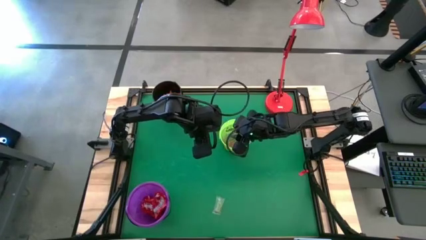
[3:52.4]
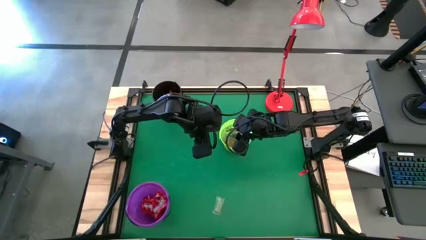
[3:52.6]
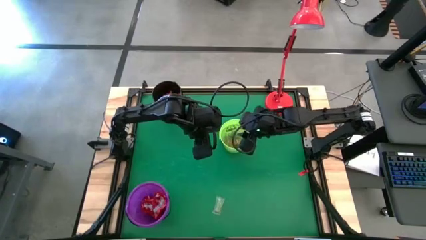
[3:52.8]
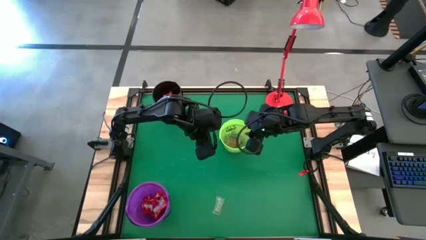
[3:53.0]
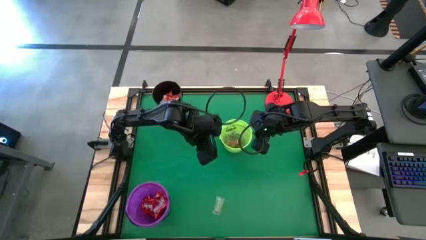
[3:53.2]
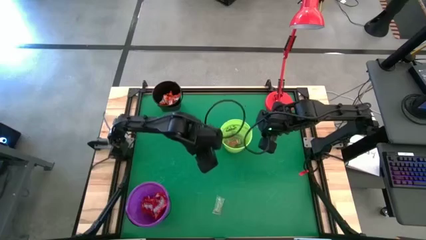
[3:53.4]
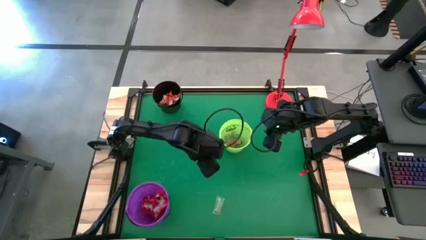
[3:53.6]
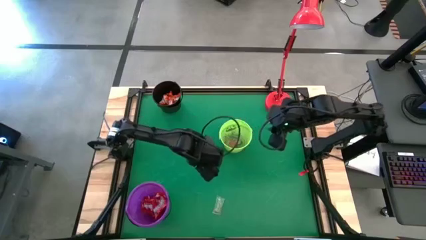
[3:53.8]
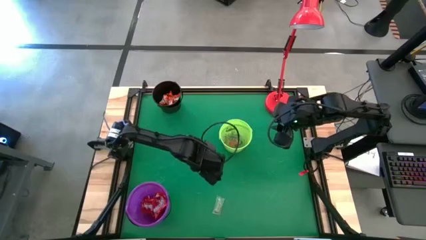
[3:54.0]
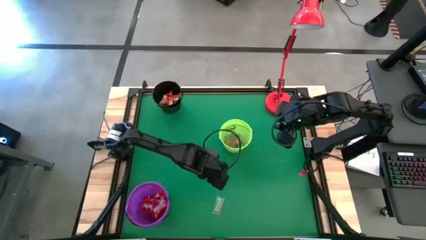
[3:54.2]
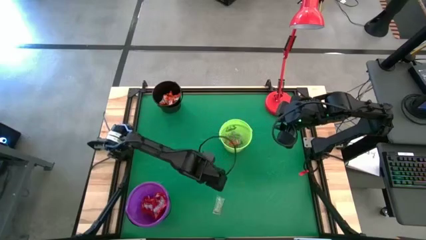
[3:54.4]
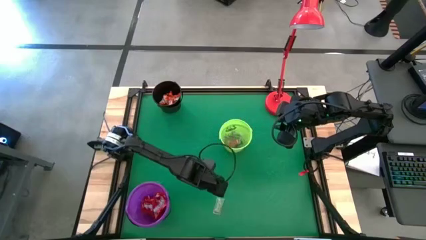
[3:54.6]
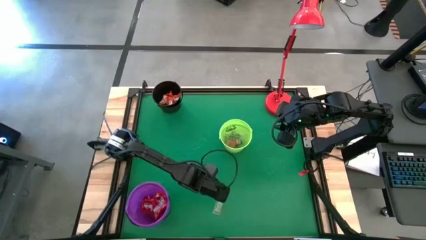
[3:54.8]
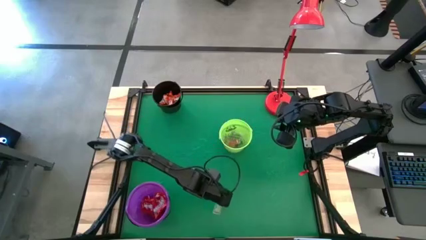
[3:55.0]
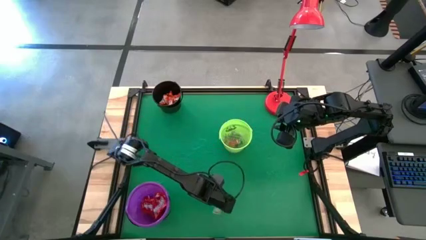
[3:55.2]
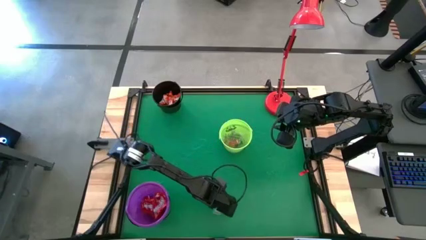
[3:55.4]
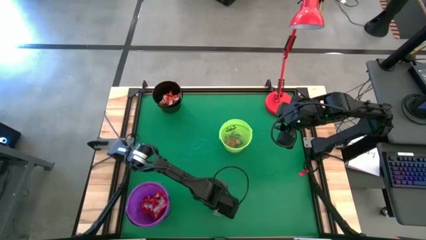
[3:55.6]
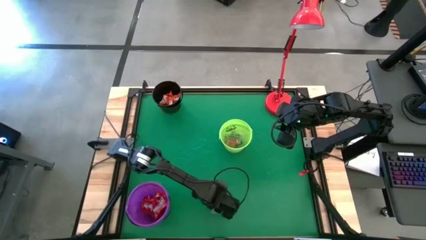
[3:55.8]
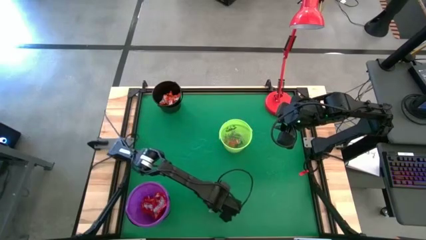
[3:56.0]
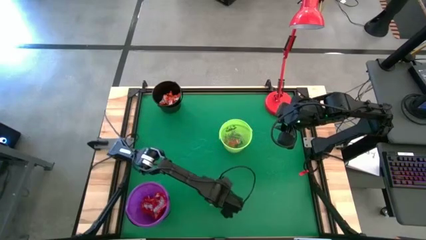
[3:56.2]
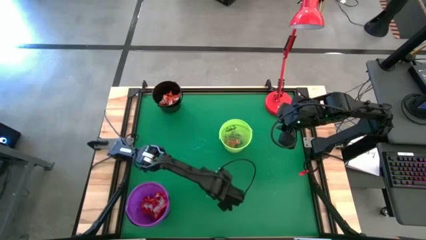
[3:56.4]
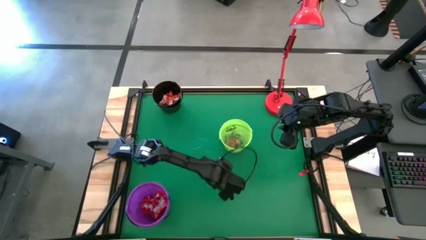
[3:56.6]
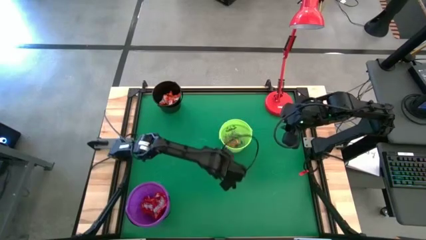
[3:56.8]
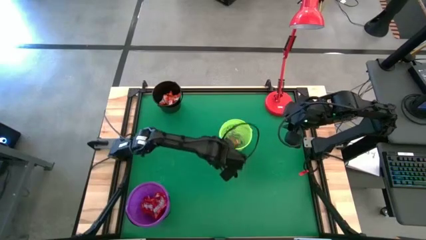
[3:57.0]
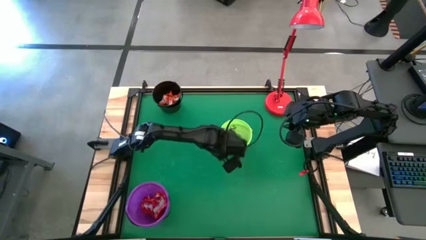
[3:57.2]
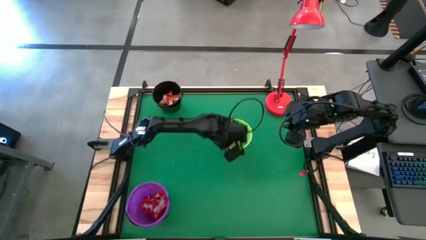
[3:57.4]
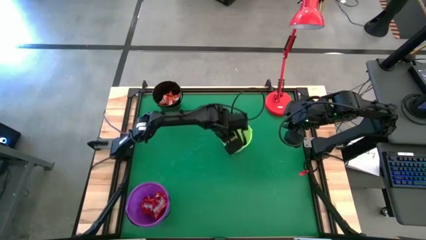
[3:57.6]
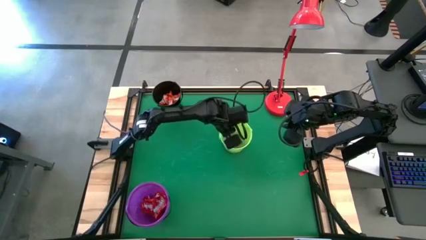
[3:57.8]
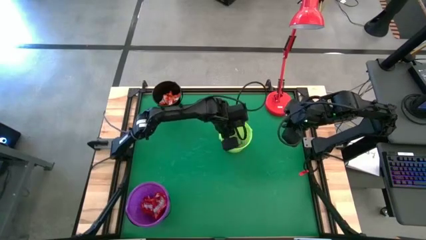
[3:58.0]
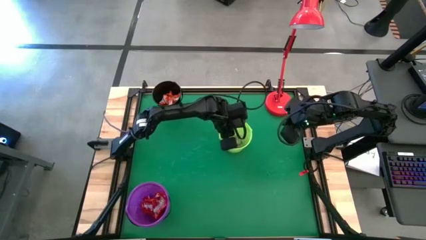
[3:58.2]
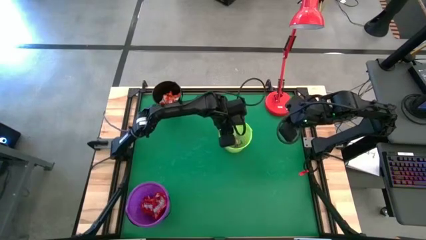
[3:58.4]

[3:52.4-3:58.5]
Task: Sort candy
Put the green gummy into the green bucket

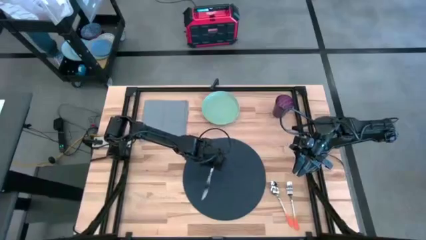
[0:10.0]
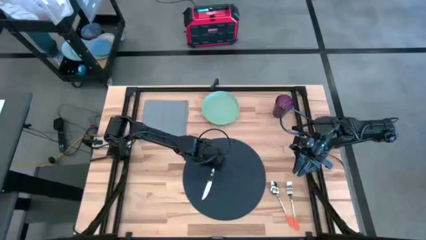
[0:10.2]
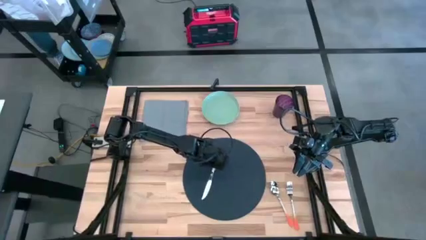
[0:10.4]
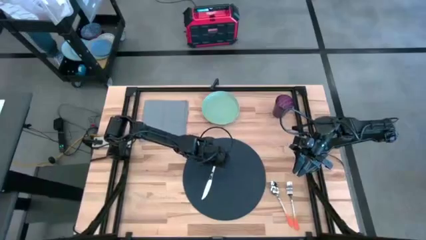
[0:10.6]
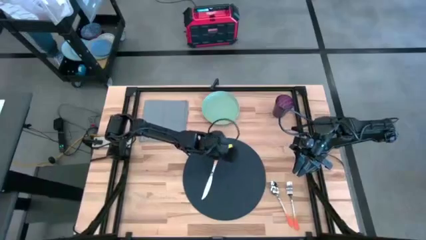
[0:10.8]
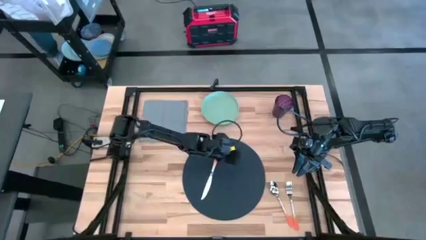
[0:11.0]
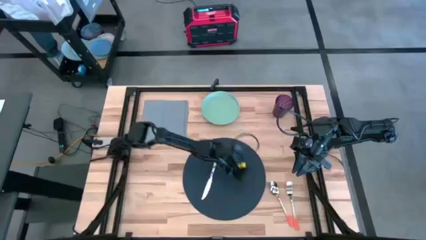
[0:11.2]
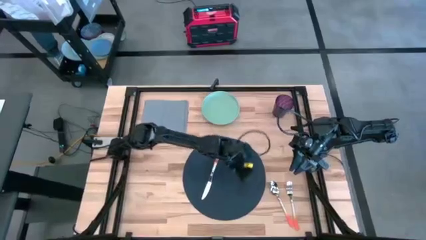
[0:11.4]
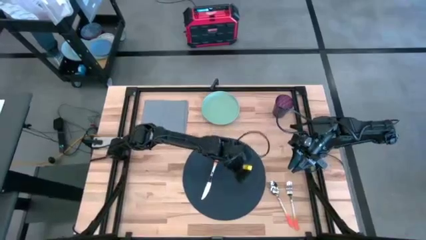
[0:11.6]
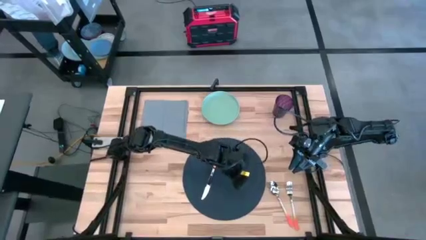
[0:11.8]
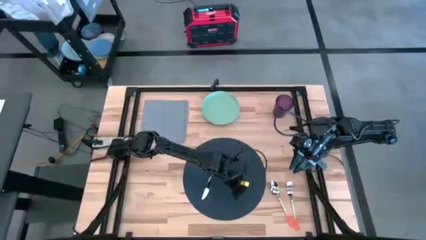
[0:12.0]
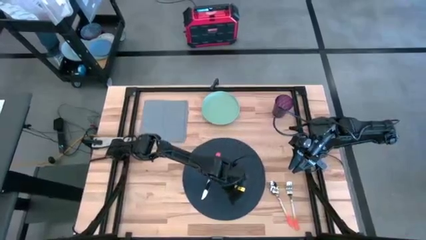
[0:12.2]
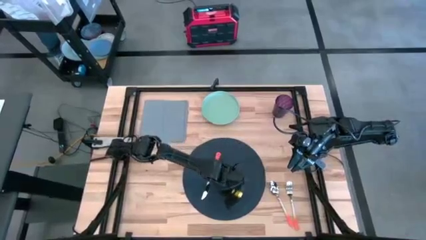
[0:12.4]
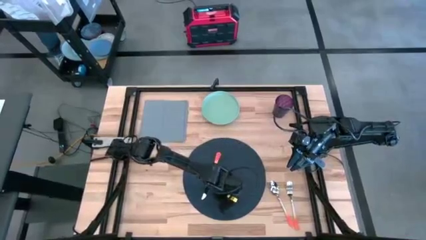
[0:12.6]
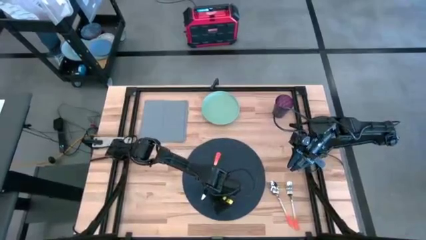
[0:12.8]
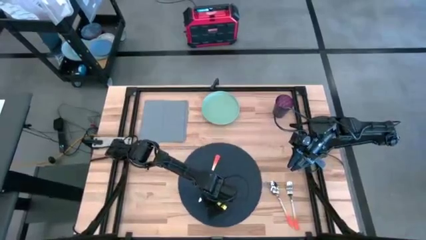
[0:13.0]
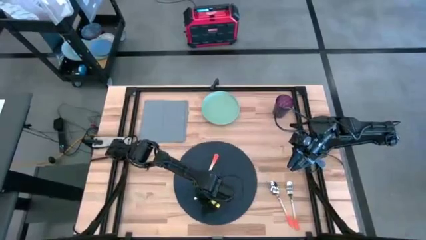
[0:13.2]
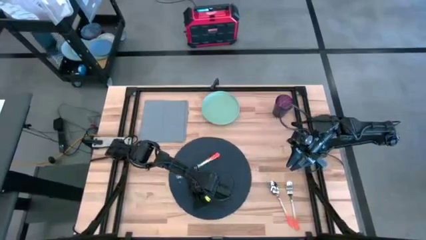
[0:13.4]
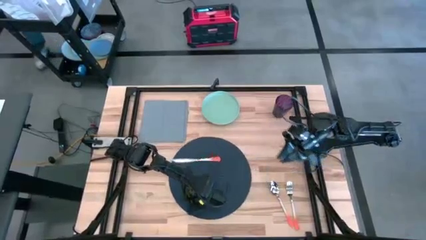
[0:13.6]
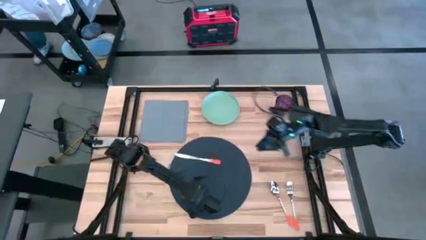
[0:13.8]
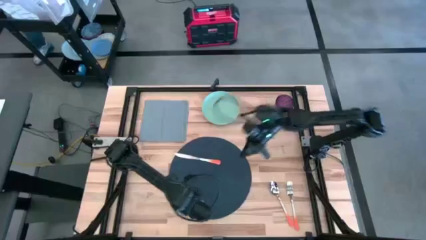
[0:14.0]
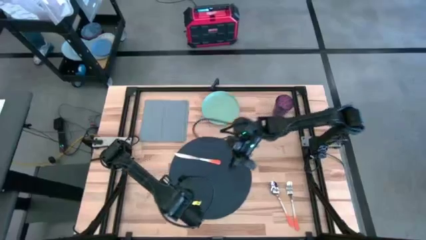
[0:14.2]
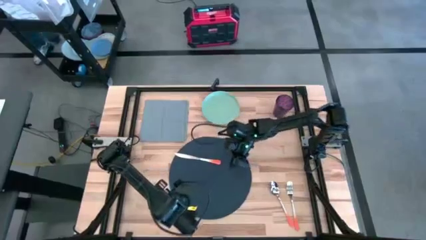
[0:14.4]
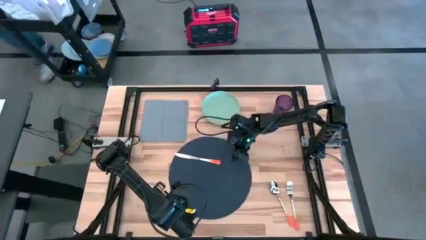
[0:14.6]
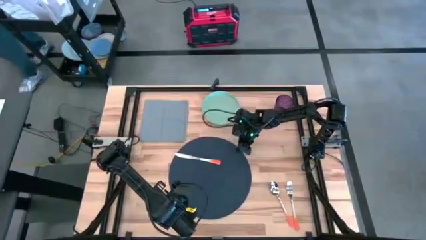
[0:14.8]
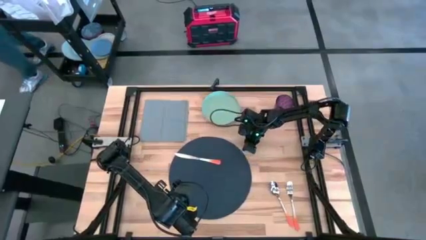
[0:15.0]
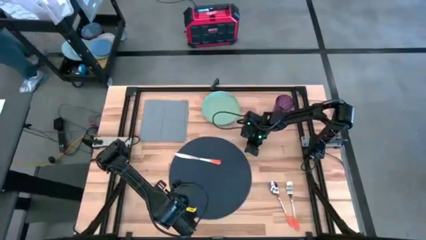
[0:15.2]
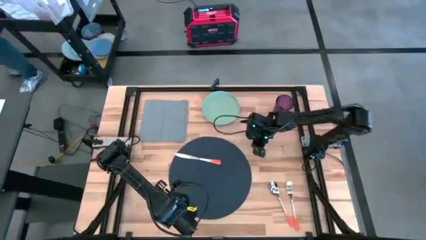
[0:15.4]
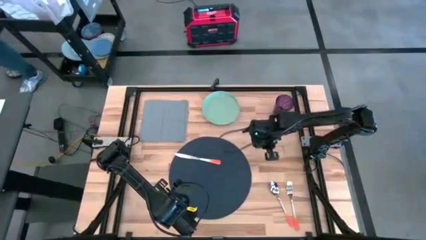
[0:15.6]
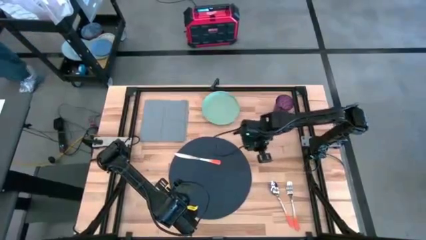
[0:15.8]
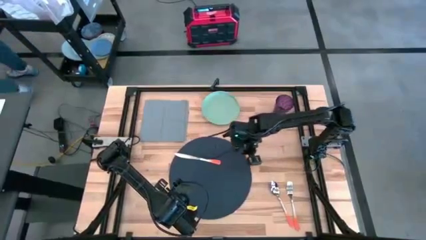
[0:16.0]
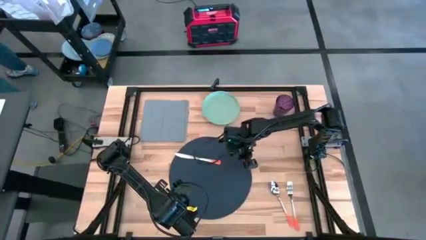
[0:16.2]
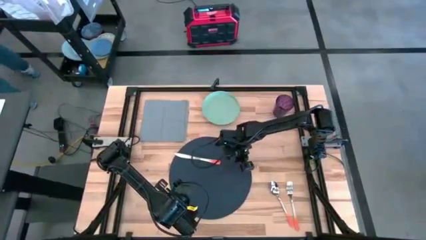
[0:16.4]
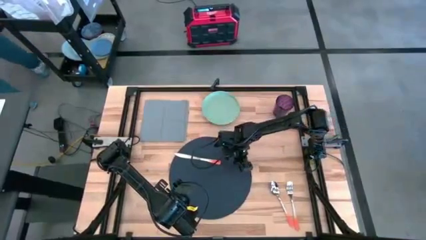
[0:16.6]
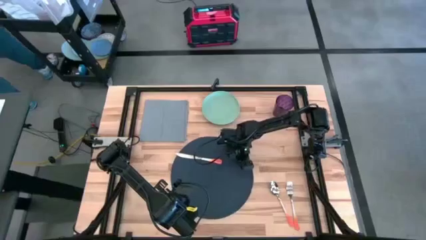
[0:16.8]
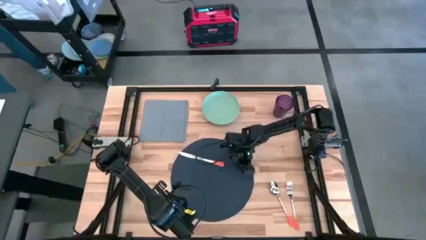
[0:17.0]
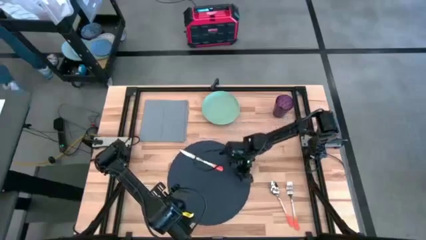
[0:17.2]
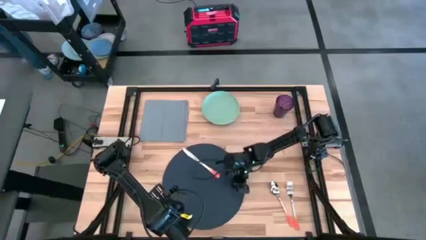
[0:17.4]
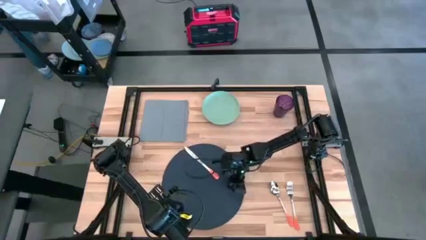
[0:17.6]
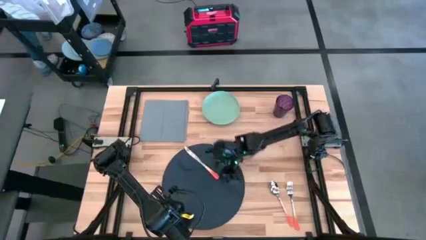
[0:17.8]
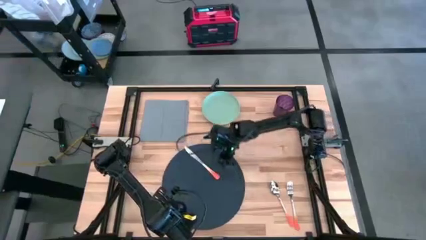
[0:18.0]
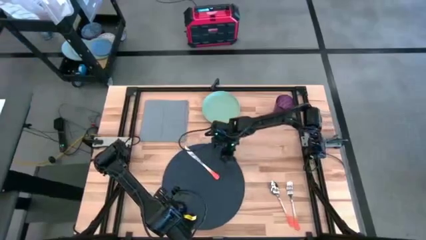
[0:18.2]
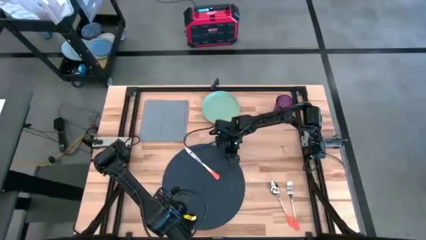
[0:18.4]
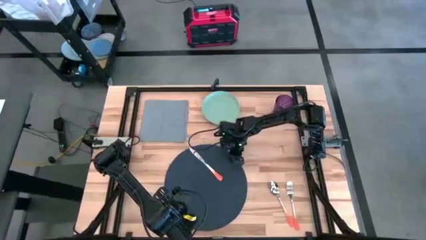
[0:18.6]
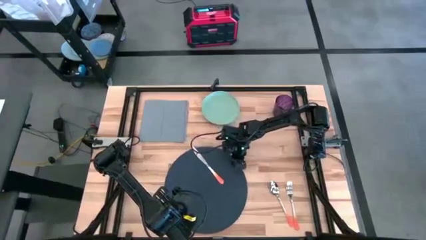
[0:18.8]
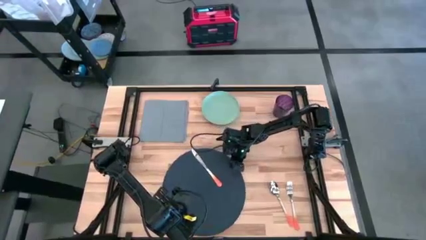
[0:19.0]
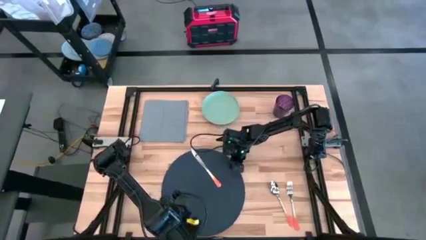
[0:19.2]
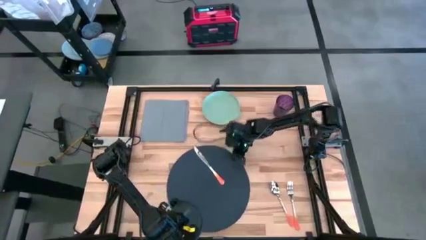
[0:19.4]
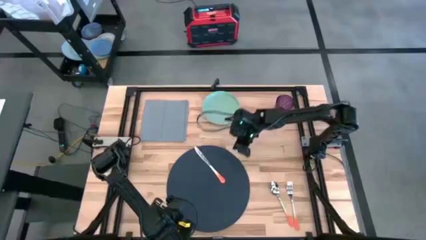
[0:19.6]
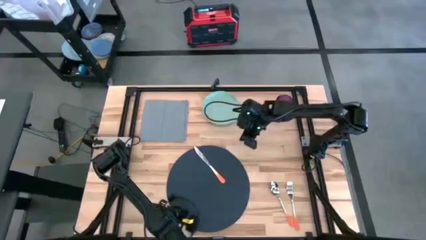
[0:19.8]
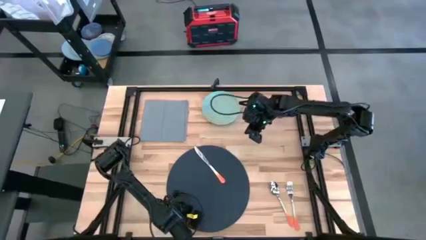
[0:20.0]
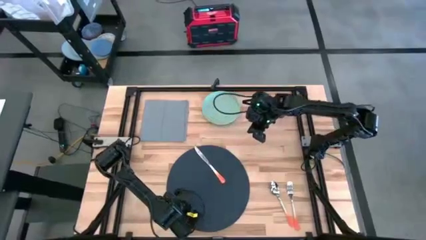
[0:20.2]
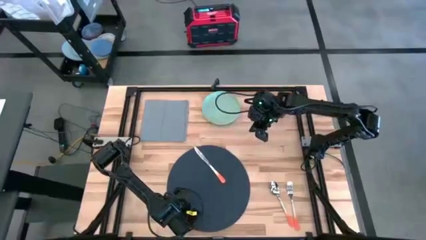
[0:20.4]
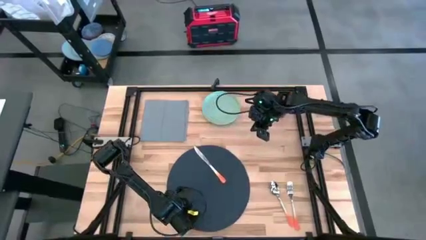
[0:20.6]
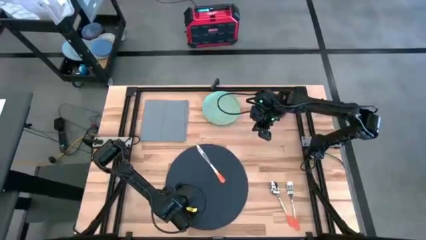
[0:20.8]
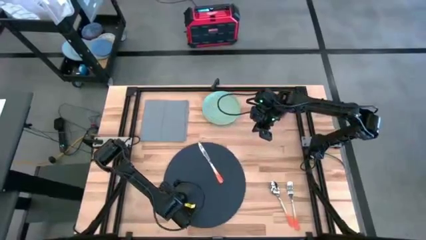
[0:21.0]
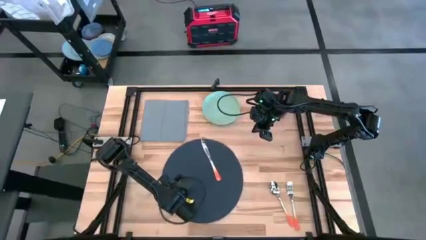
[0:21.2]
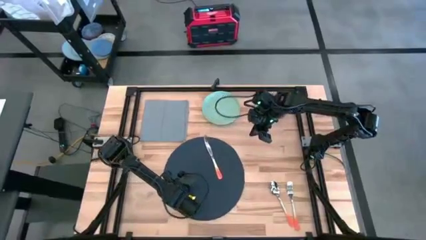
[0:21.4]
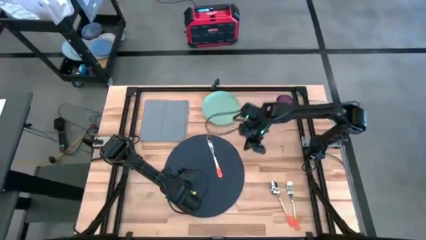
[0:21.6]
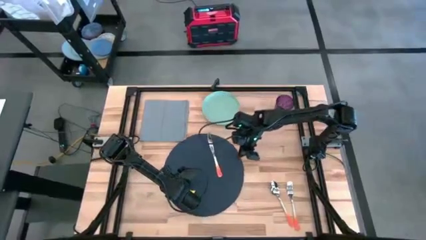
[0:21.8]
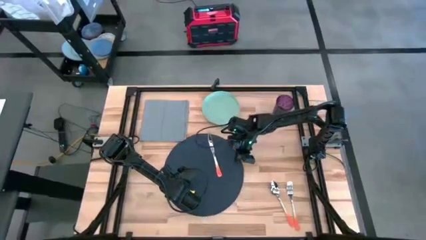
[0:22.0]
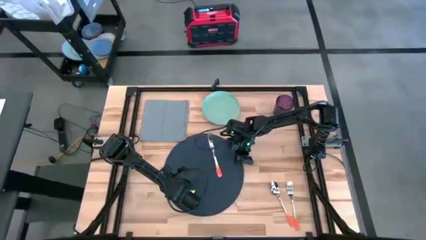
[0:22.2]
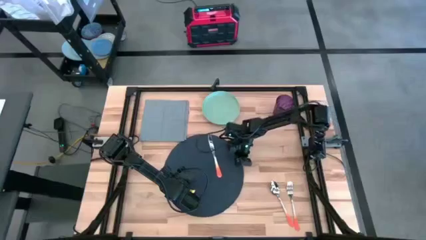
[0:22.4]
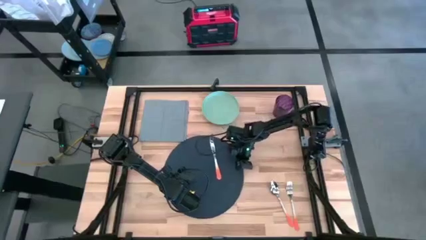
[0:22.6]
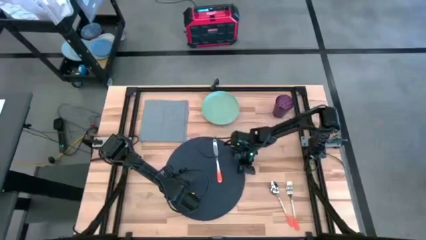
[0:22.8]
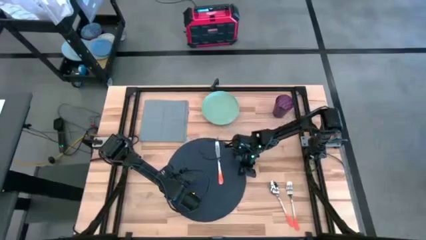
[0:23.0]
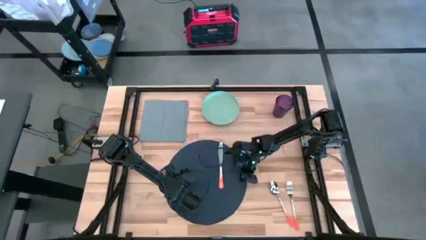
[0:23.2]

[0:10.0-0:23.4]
Task: Set table place
Adjust the dark gray placemat on the table
